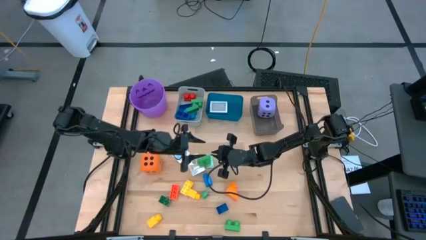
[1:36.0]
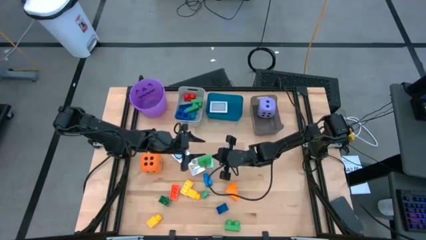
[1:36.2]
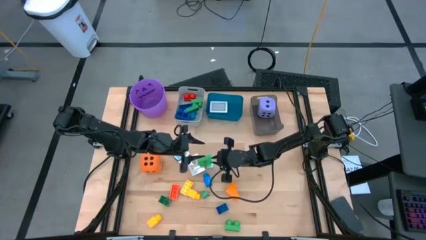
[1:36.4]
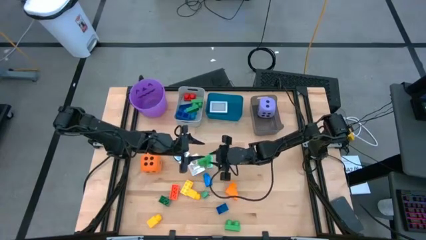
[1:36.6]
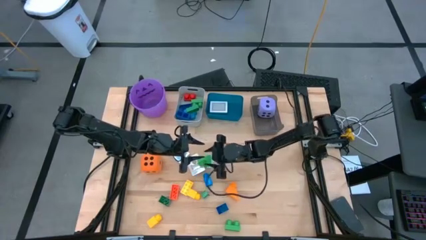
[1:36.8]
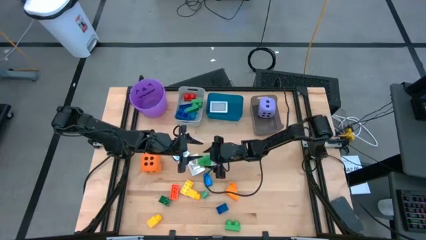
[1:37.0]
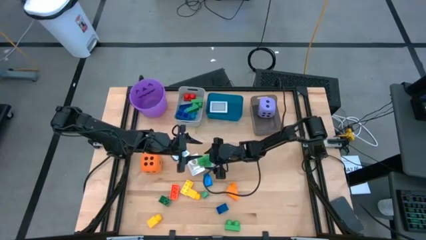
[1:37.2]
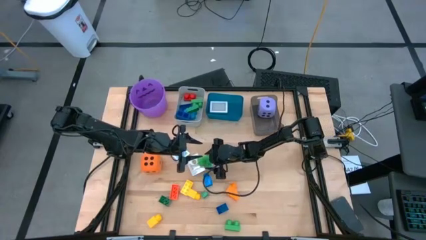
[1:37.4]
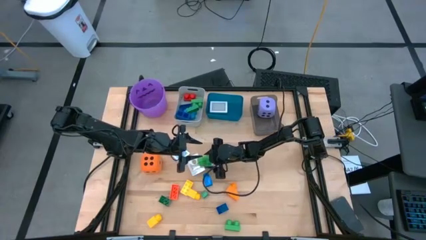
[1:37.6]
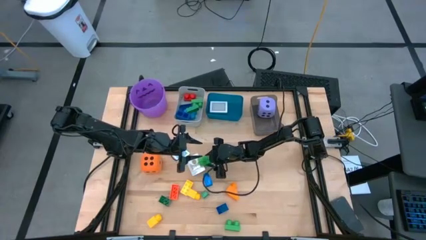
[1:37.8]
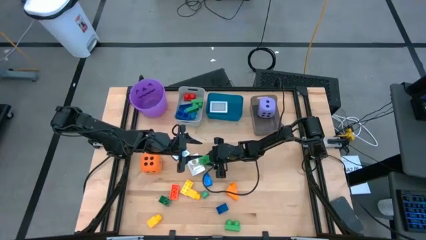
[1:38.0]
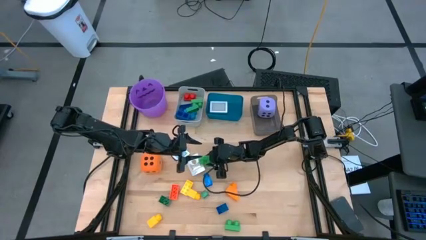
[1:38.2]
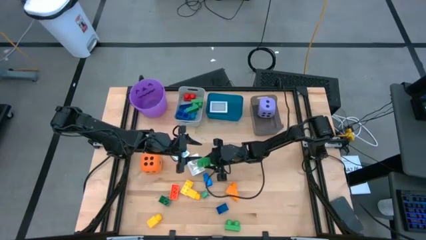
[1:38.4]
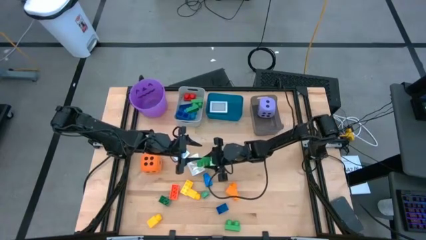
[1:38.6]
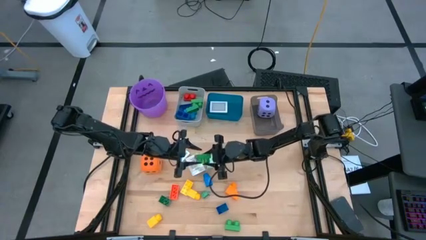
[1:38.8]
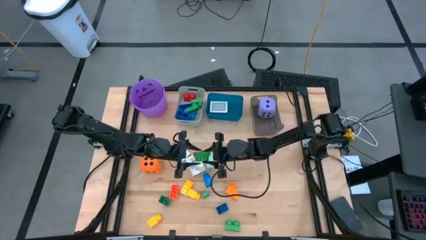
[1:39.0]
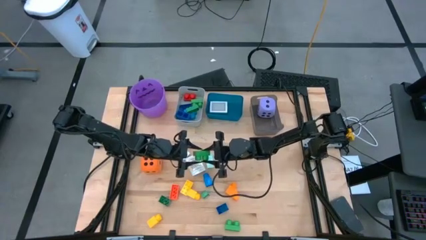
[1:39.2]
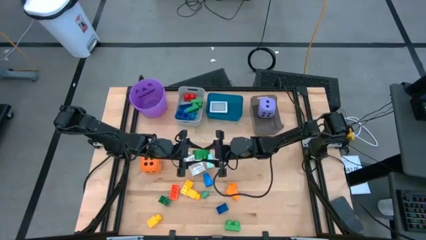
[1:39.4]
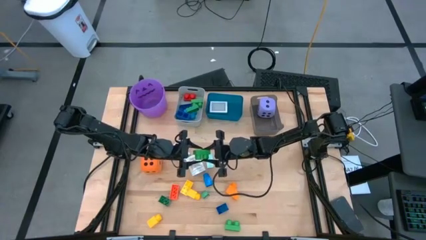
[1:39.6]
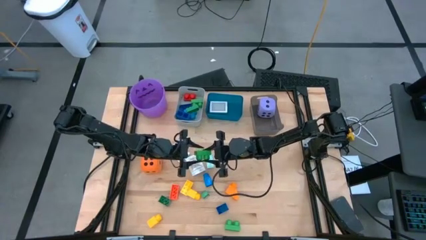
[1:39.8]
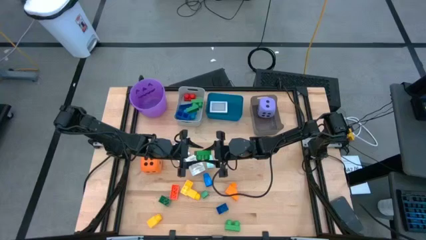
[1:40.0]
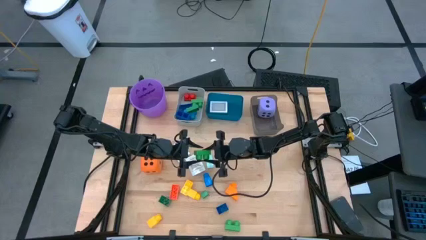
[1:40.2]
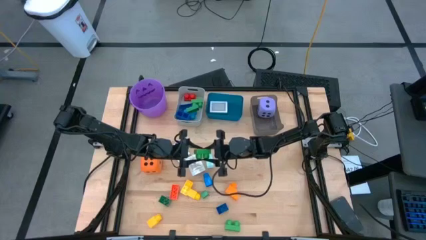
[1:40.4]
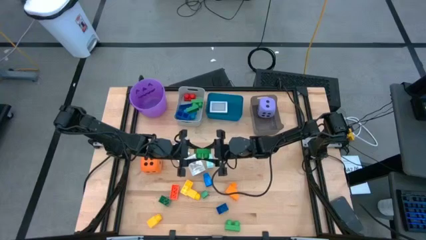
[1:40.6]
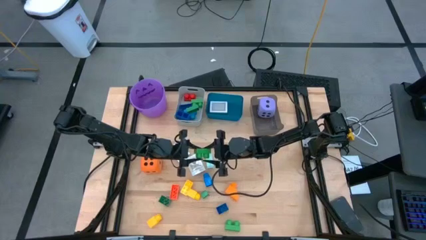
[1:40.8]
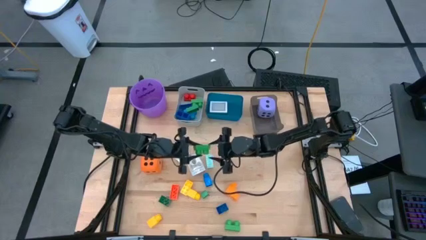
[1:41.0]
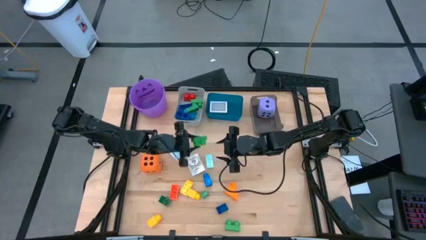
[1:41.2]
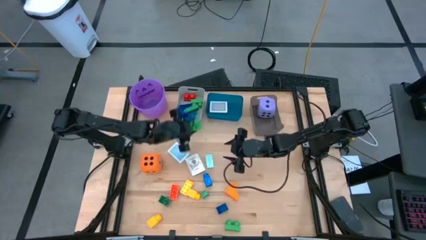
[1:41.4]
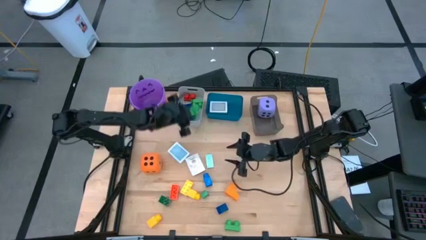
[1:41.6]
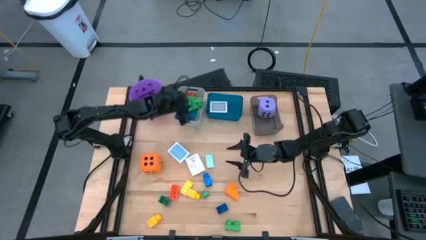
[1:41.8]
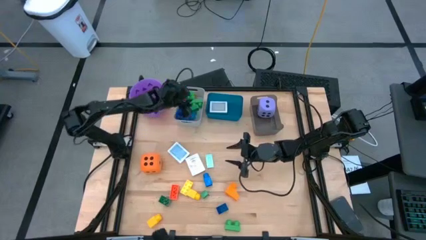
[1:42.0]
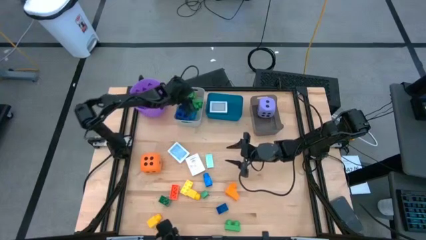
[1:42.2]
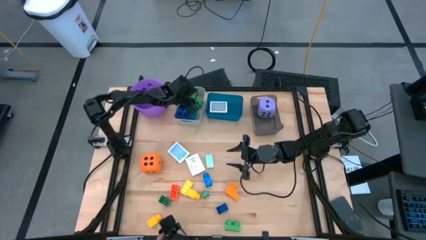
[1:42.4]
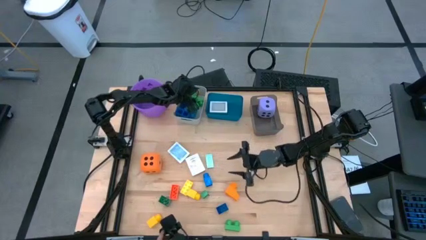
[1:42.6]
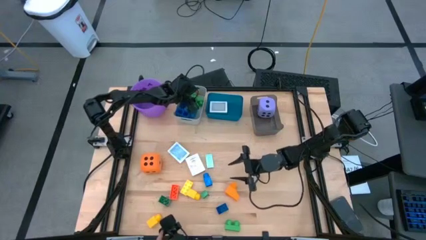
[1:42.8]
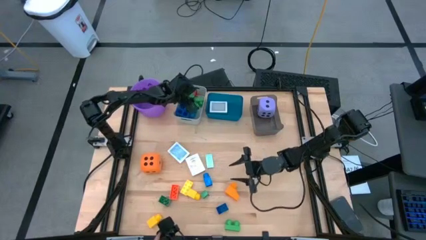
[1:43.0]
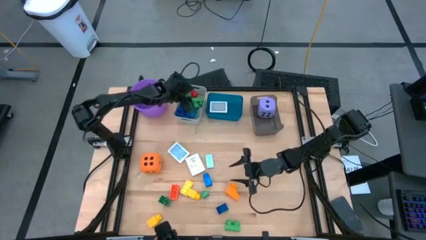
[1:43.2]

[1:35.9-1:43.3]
Task: Pick & Place Toys
Put the top green game piece into the gray bin

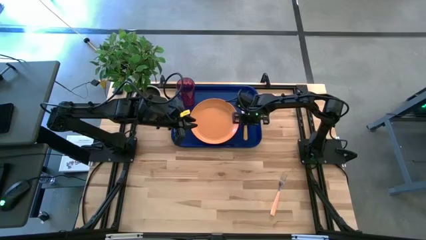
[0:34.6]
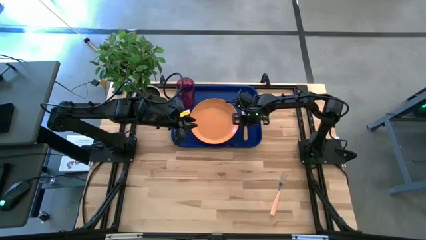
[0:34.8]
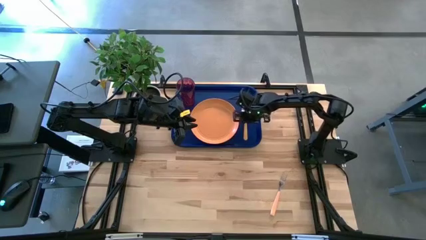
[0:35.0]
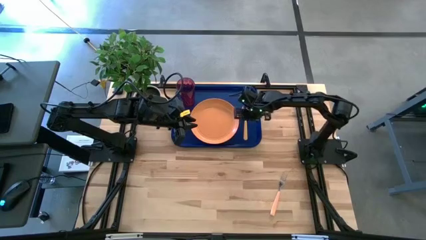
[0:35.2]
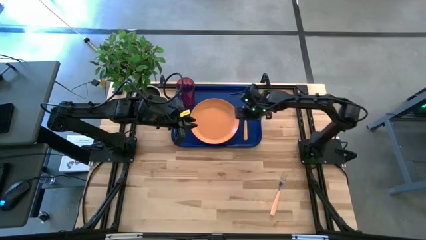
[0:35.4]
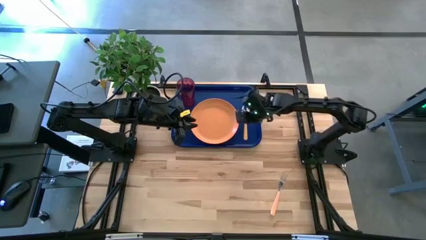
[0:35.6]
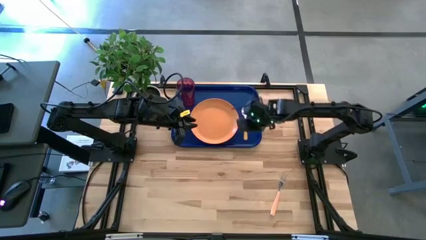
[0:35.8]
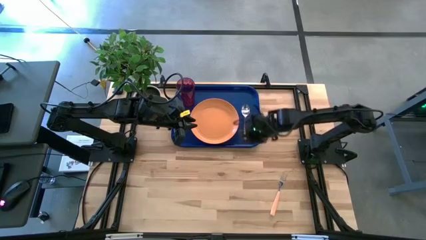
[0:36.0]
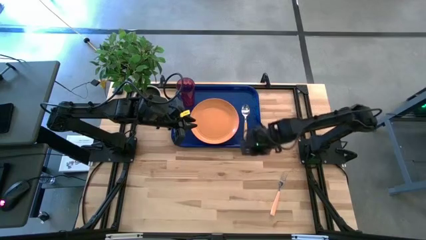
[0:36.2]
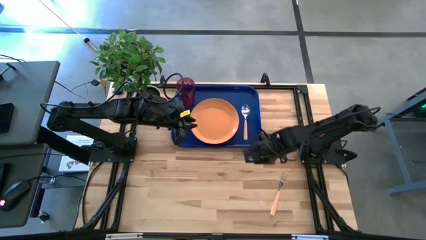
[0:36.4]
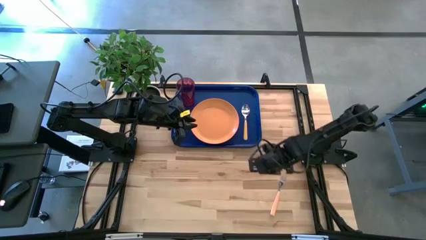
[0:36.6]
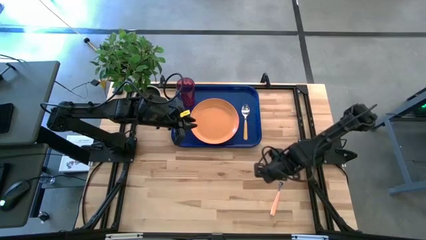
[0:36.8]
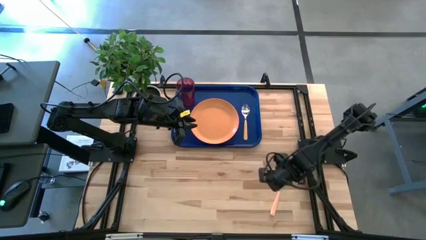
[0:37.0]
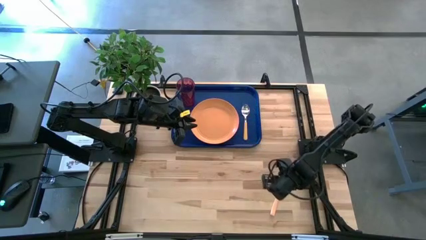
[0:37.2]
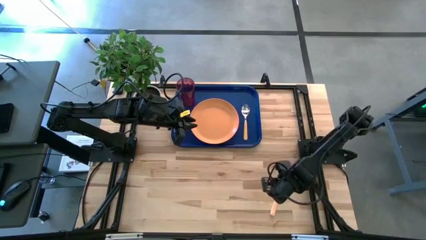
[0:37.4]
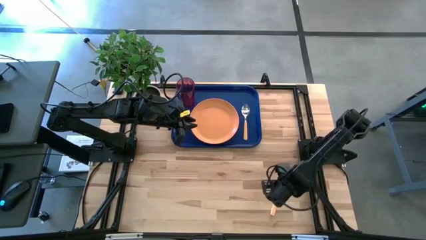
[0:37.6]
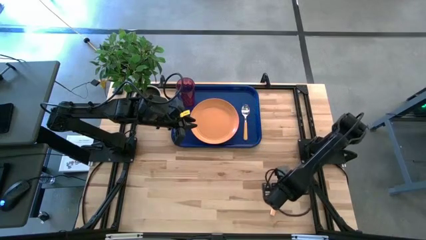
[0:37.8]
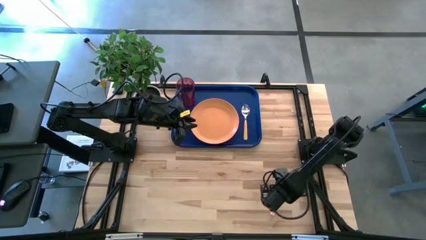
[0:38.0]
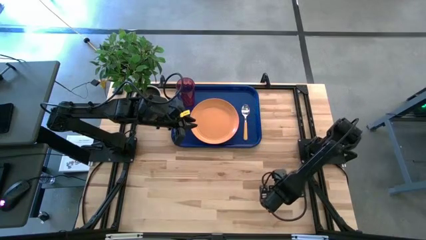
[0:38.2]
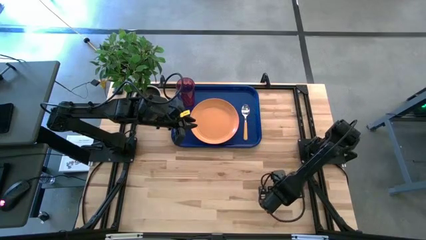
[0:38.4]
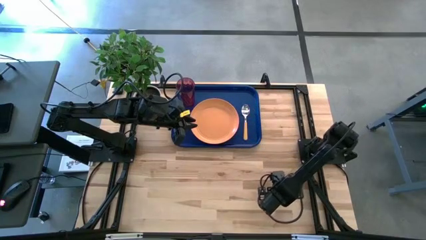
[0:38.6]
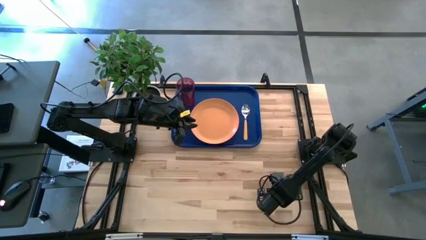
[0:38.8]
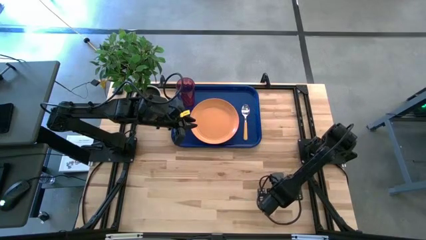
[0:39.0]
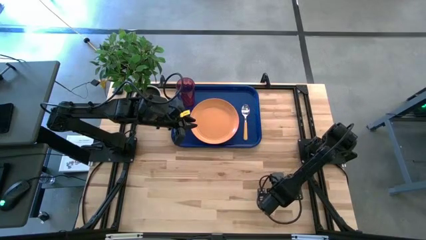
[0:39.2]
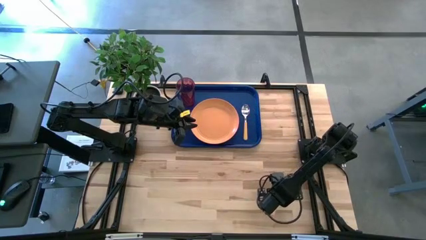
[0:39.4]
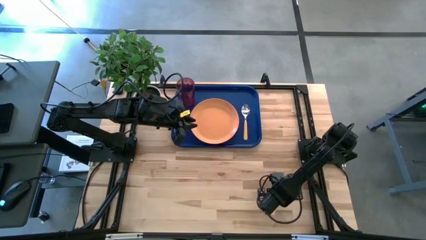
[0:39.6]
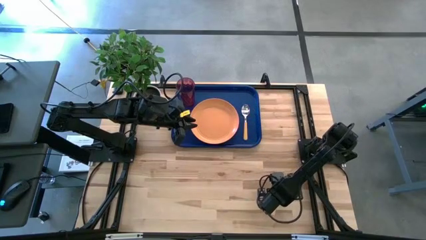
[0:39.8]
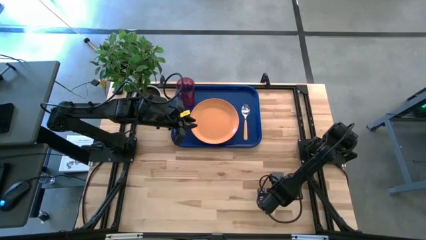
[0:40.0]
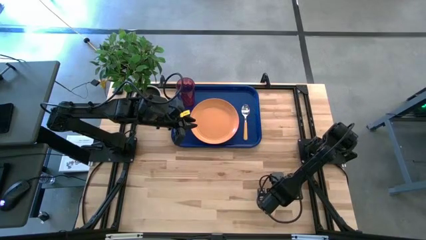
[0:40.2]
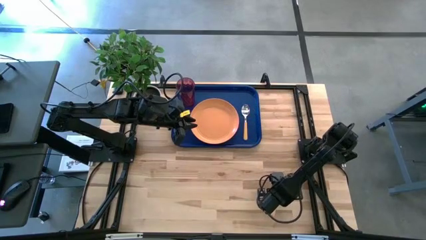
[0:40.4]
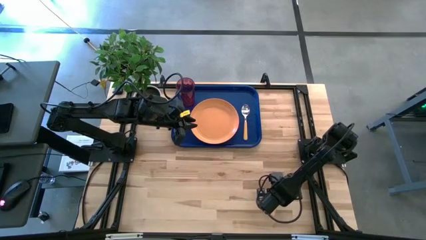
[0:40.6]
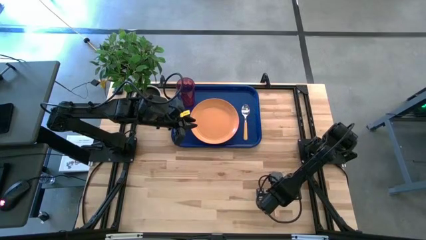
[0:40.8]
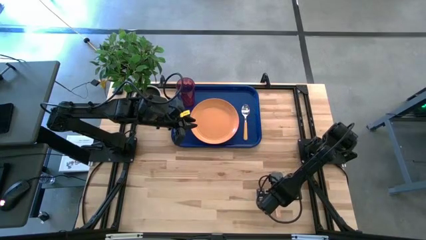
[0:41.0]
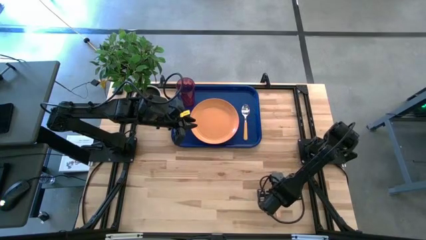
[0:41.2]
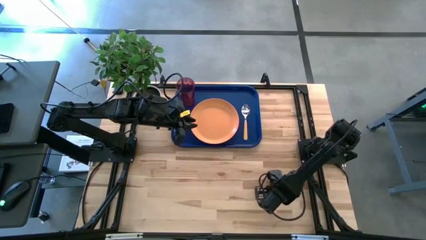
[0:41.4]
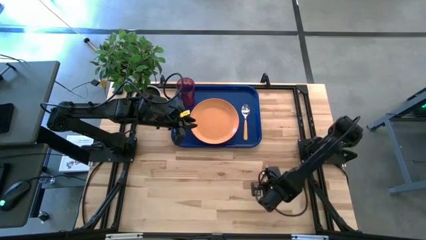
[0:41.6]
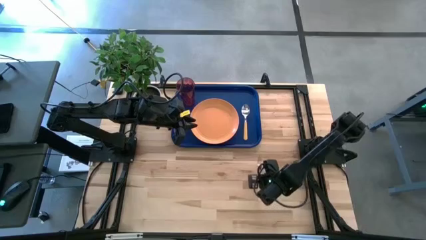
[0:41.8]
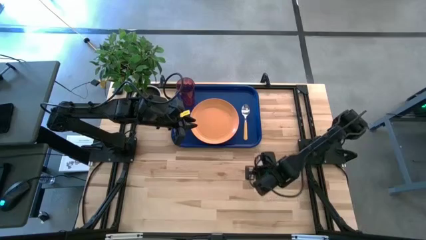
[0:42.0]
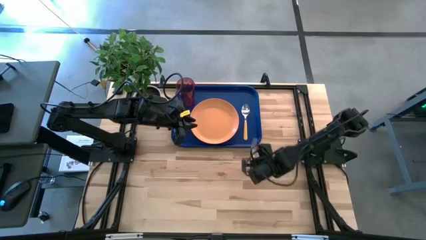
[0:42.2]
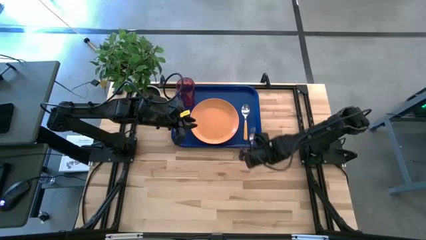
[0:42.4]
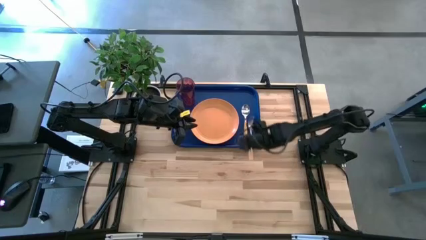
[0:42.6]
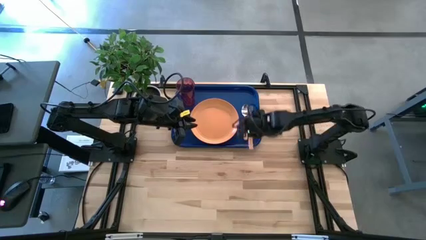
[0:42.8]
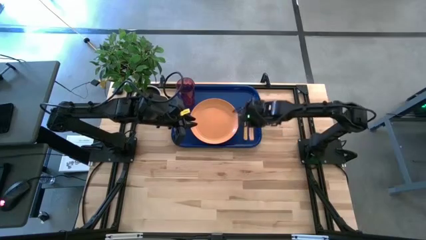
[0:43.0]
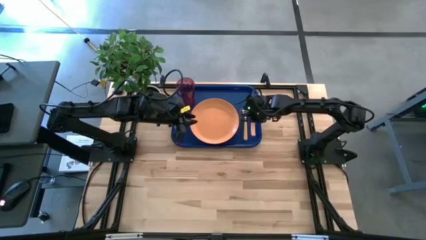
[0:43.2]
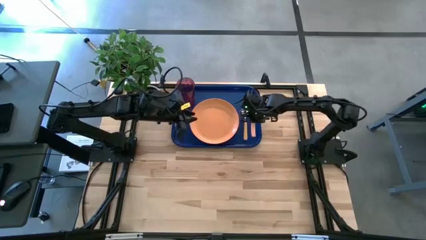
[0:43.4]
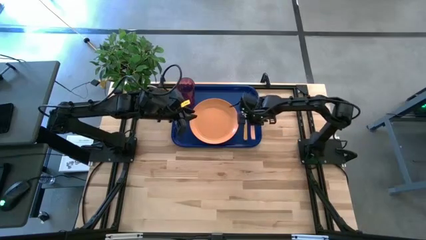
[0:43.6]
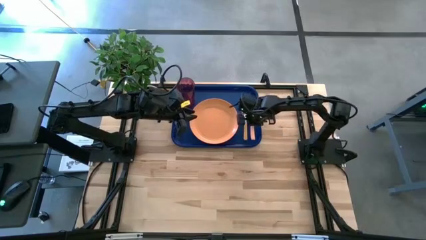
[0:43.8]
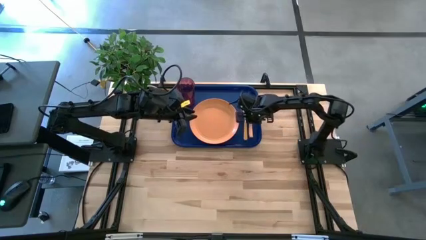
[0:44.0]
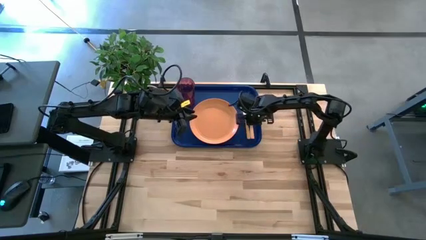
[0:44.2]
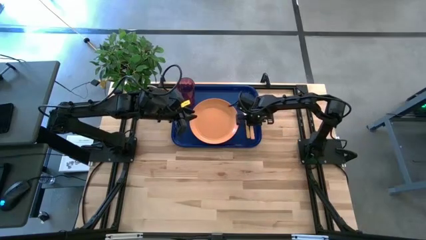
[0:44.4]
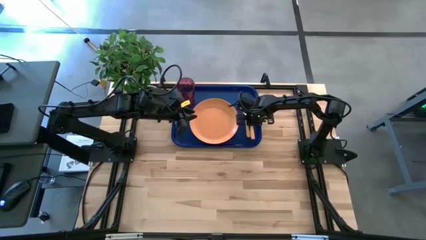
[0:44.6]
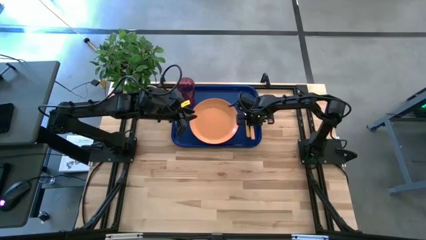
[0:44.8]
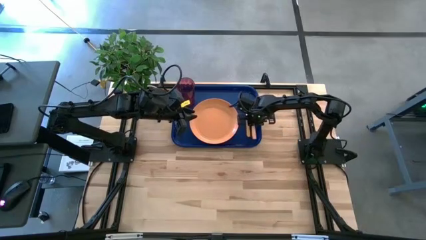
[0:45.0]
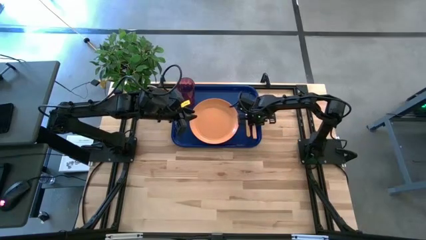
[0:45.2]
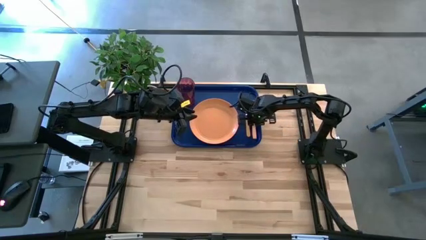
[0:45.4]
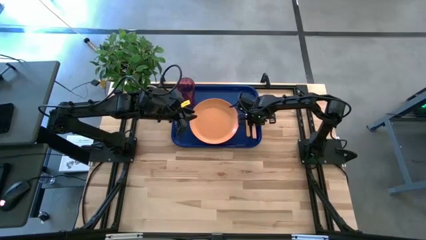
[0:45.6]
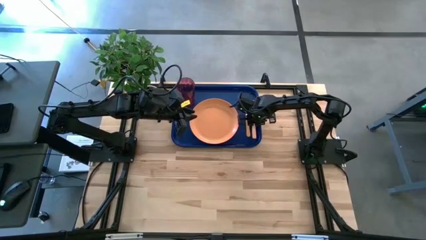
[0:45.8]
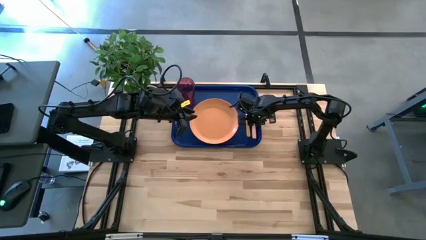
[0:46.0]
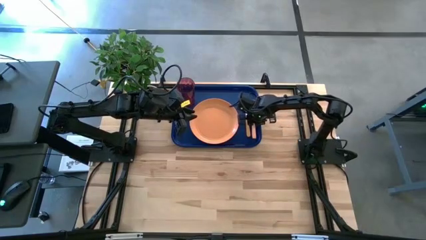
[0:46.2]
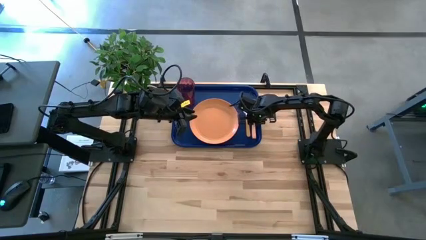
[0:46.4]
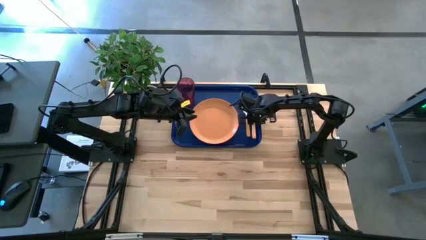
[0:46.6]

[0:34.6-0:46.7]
Task: Pick and place plate/cup/fork/spoon on tray
Put the orange fork on the blue serving tray beside the orange spoon
